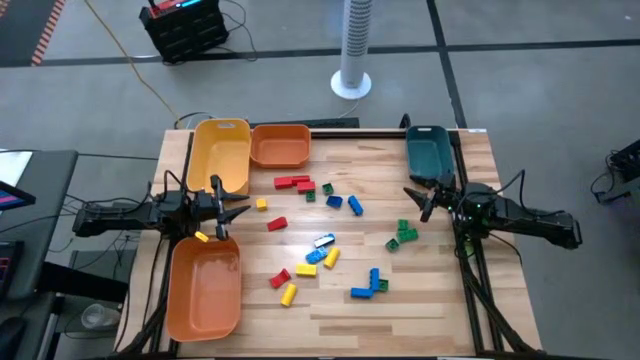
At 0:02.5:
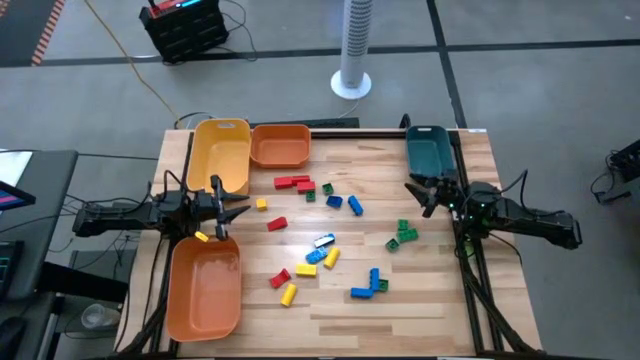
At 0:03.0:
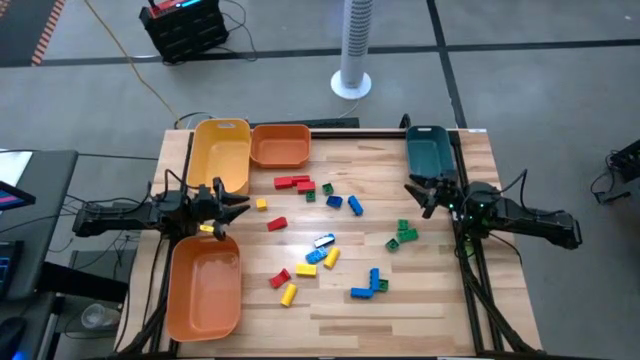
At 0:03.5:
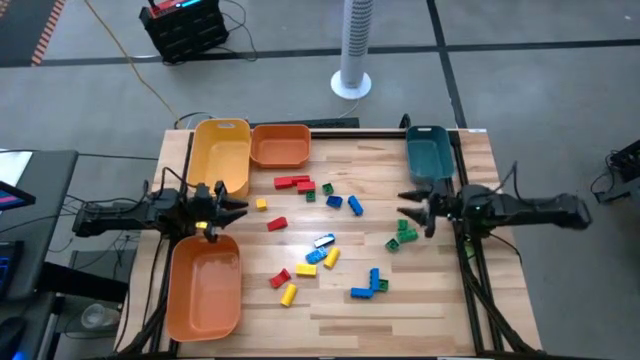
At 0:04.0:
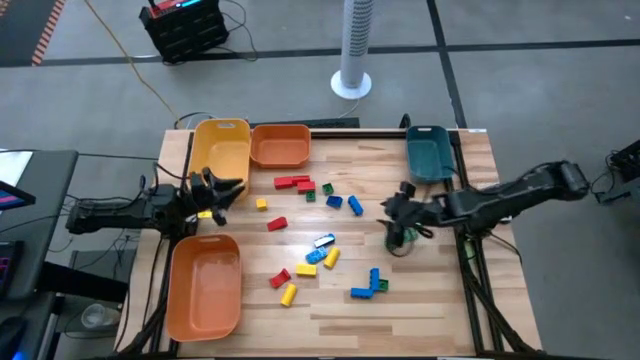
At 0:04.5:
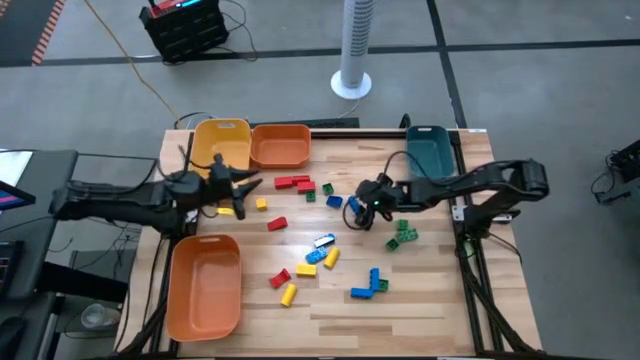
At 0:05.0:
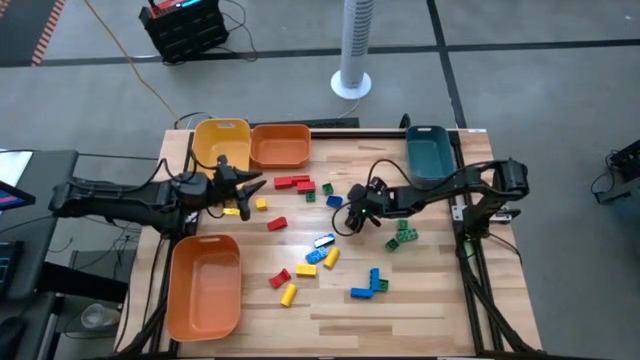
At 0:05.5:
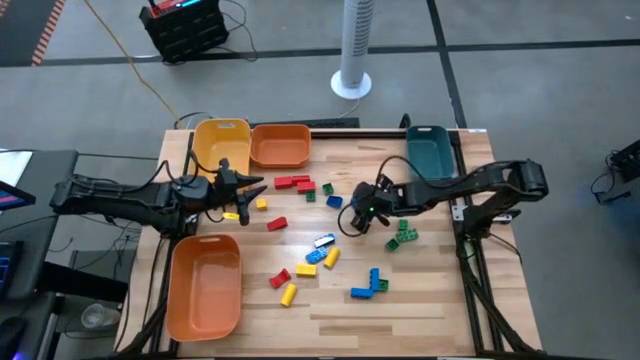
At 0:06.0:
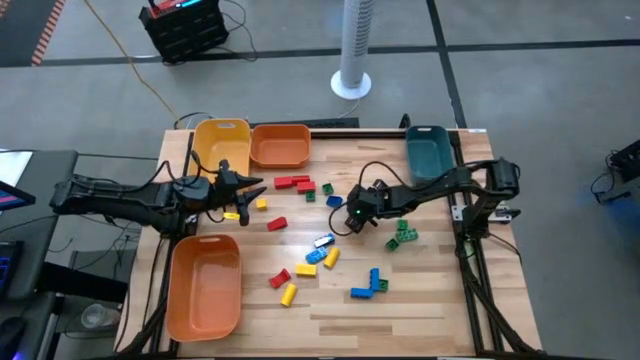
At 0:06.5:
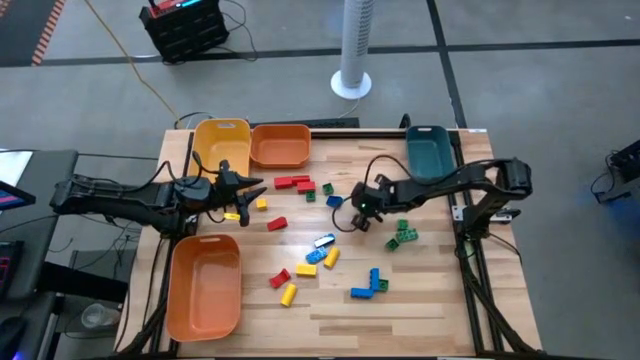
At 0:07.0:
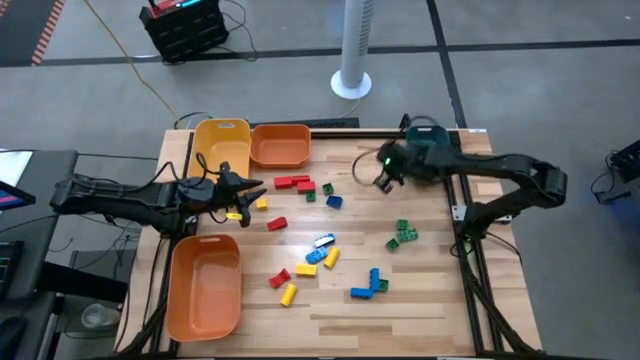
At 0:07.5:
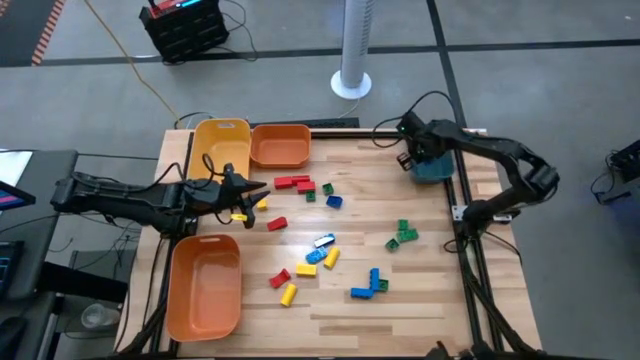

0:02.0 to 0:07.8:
Task: Sort blocks
Put the blue game piece into the blue bin

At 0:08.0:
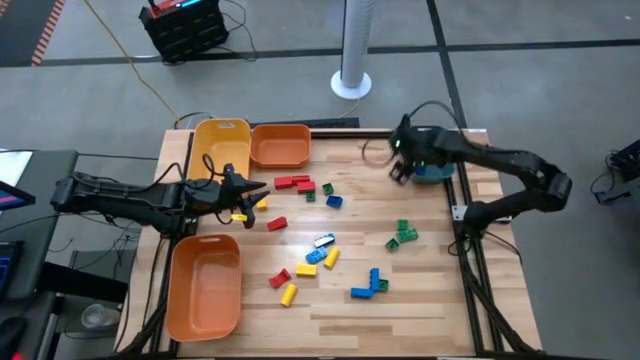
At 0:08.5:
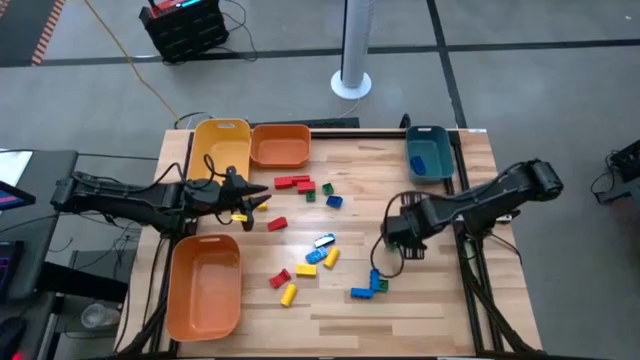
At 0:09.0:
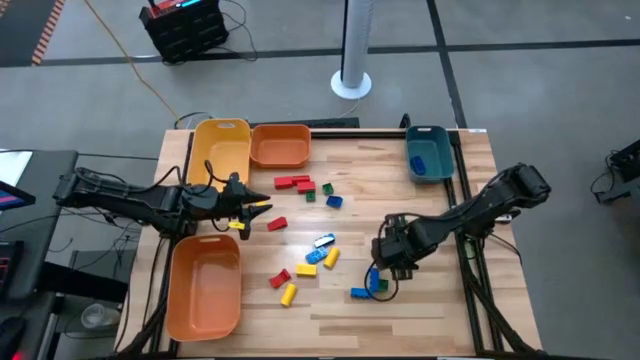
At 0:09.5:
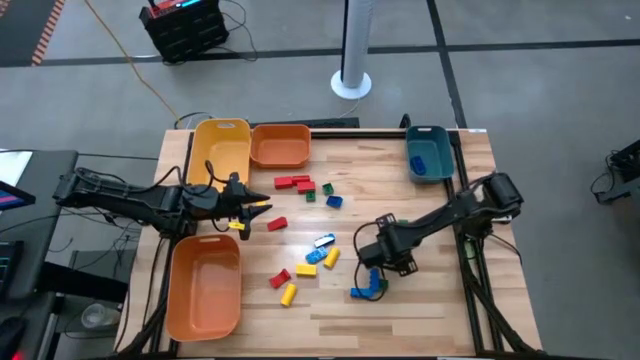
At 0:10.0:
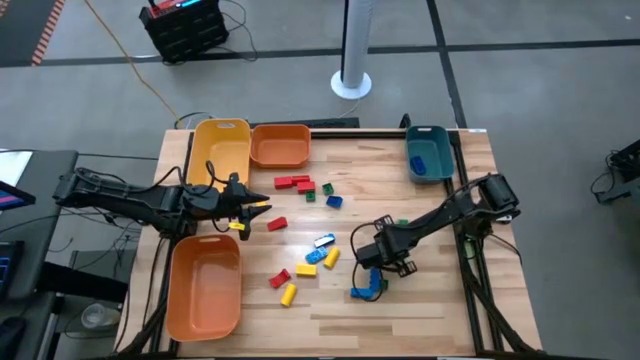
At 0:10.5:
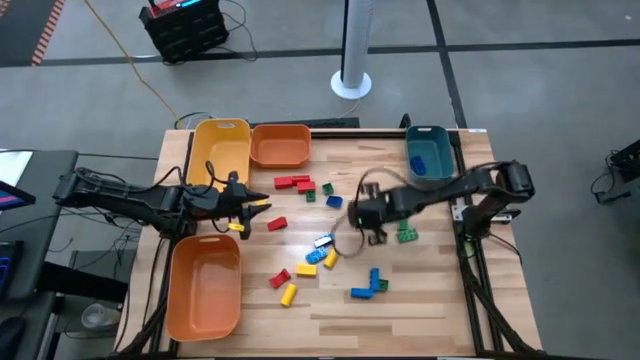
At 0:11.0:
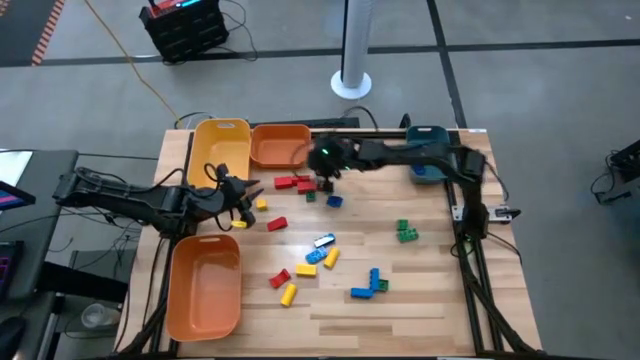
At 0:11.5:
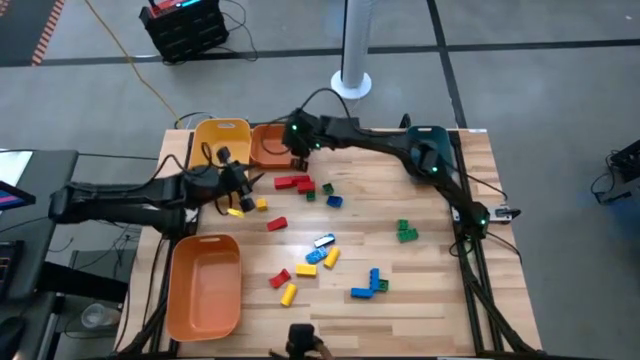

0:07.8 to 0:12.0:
Put the green game piece into the top orange bin

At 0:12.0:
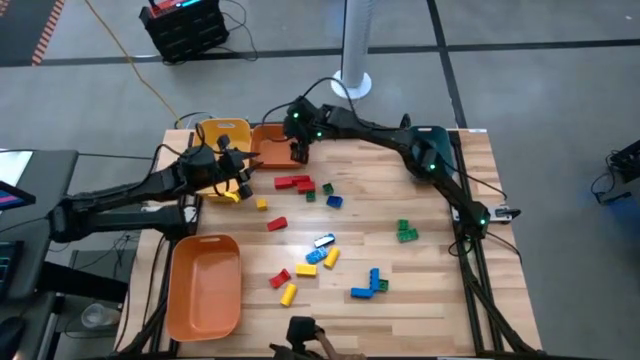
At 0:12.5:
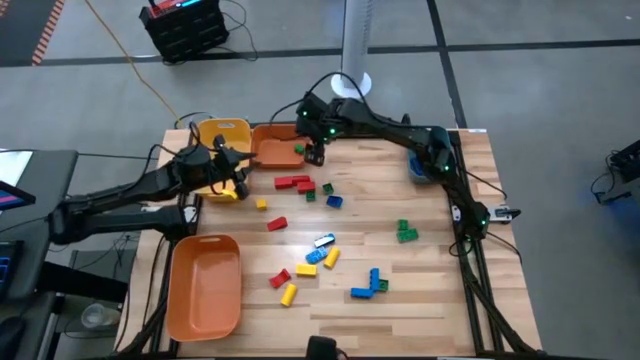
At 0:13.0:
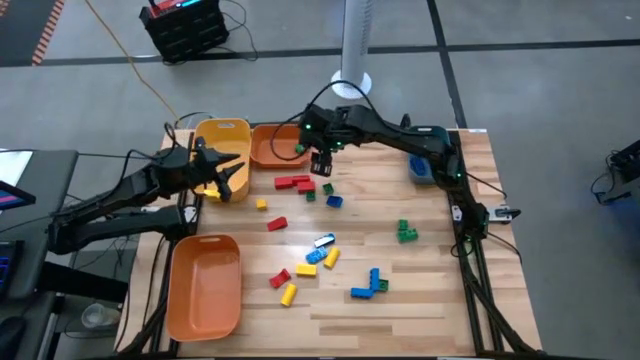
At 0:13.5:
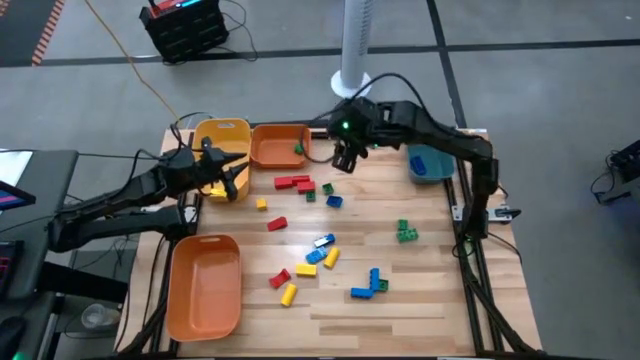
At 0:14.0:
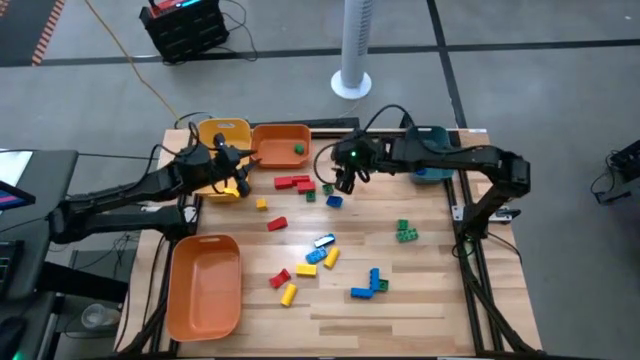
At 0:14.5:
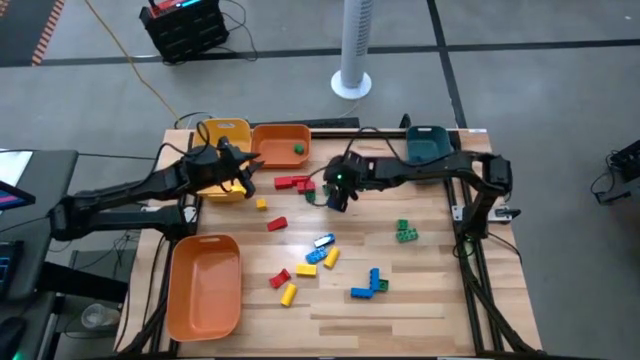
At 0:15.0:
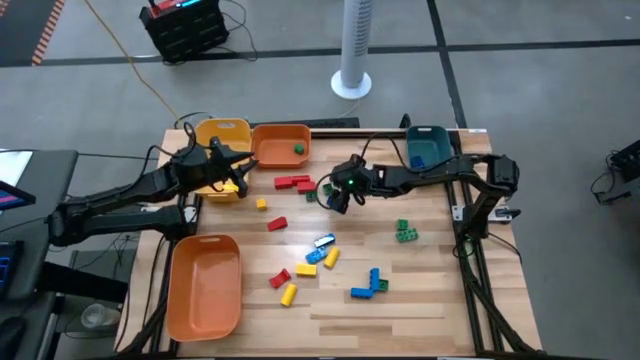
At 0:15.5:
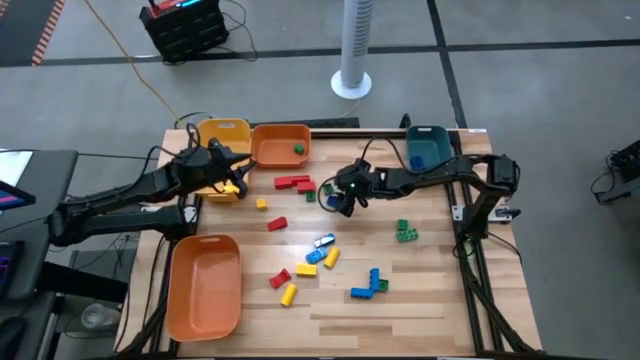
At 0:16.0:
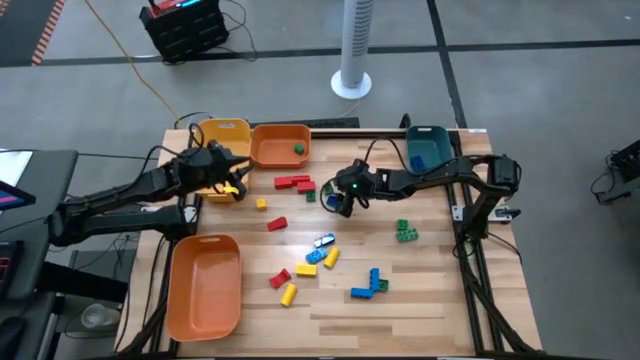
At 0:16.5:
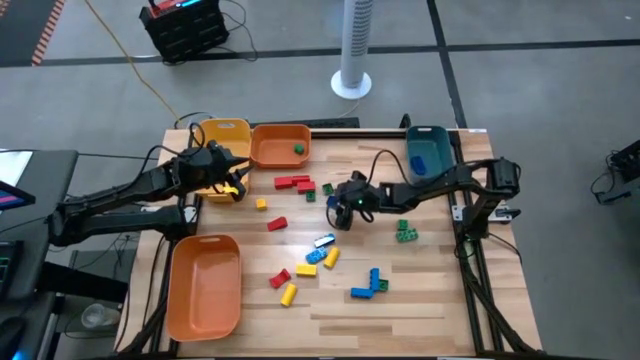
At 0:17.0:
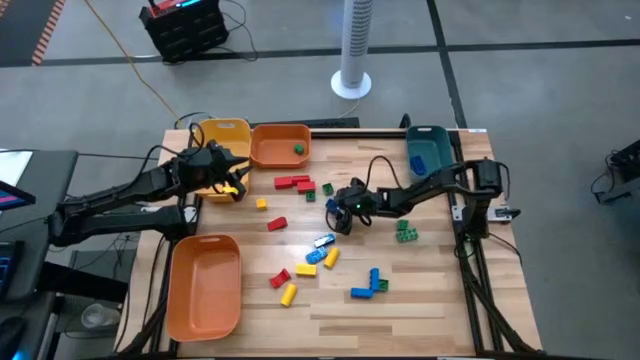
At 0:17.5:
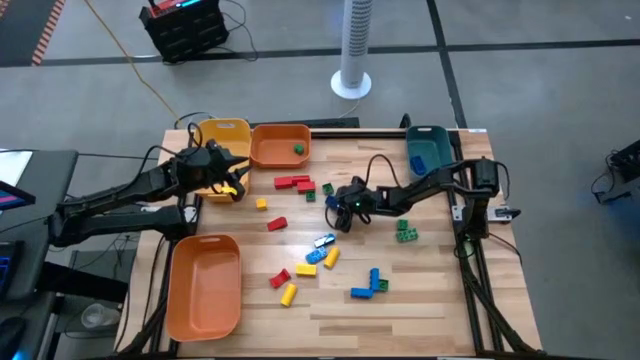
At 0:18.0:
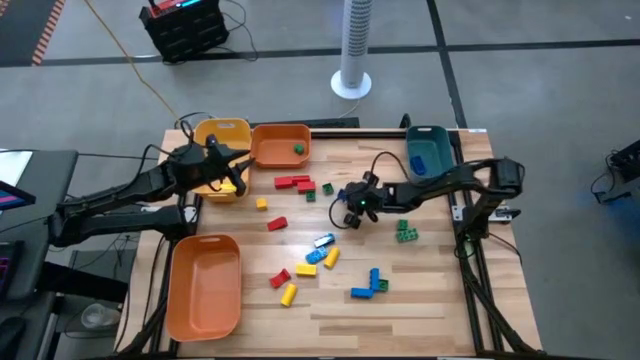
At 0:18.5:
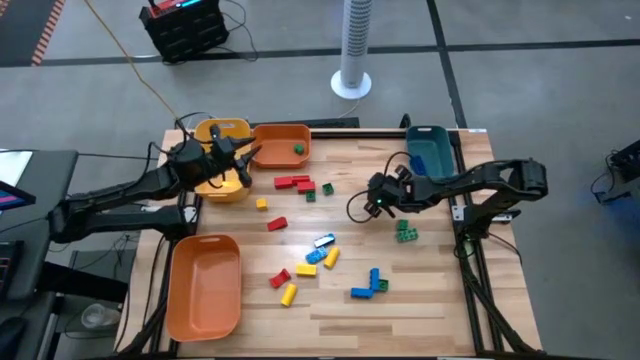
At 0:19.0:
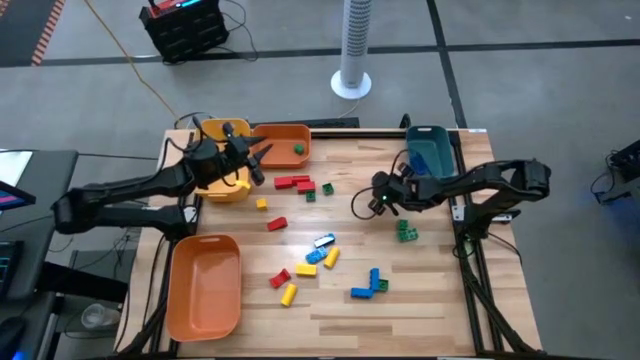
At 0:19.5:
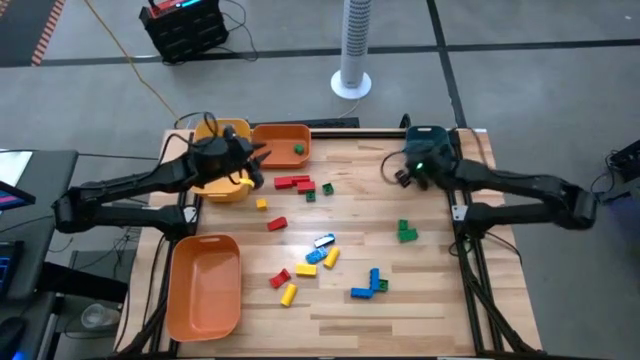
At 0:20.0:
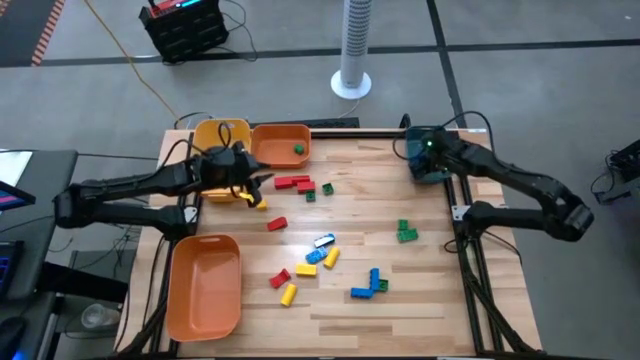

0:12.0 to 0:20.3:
Put the blue game piece into the blue bin

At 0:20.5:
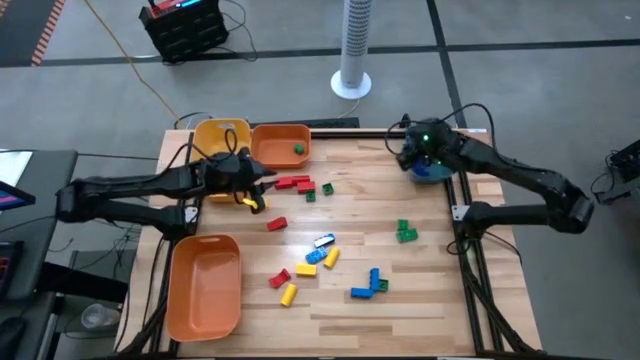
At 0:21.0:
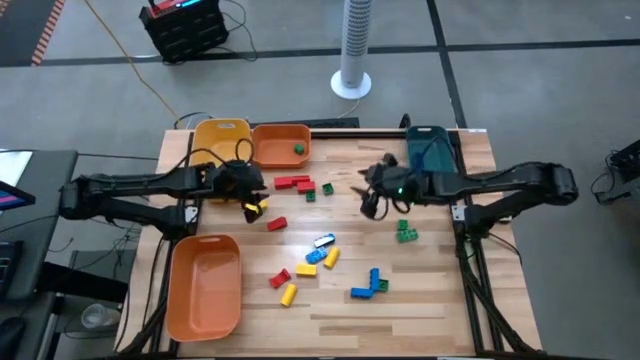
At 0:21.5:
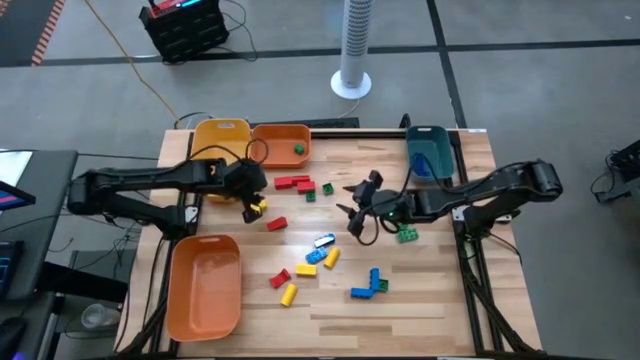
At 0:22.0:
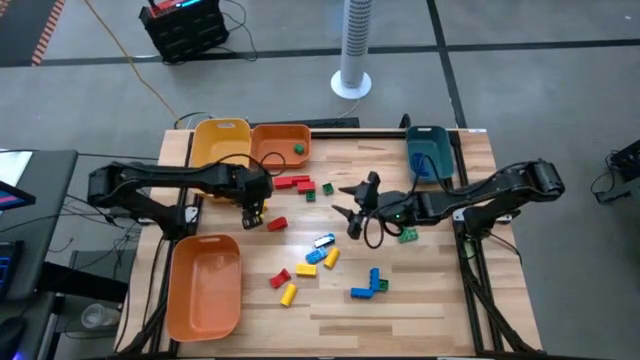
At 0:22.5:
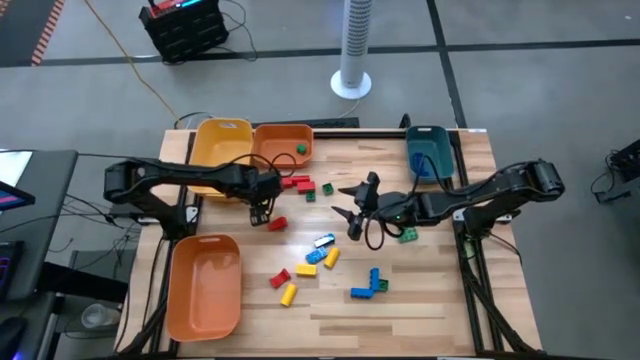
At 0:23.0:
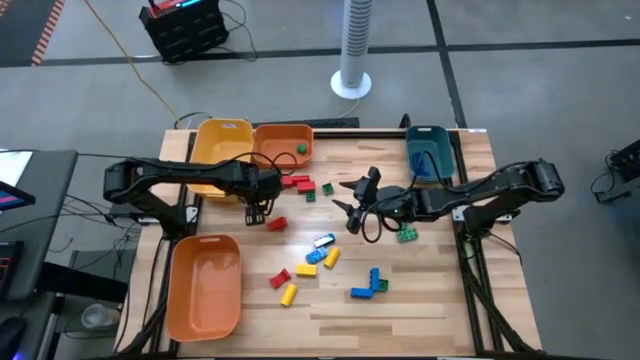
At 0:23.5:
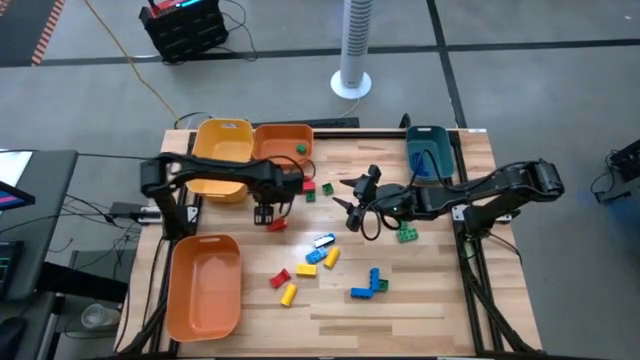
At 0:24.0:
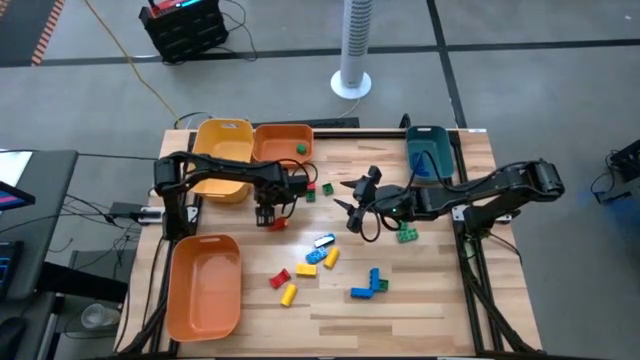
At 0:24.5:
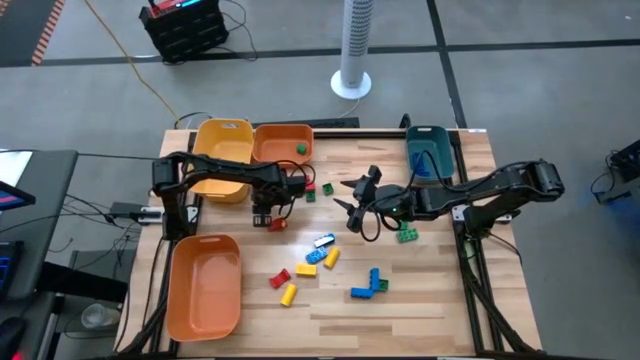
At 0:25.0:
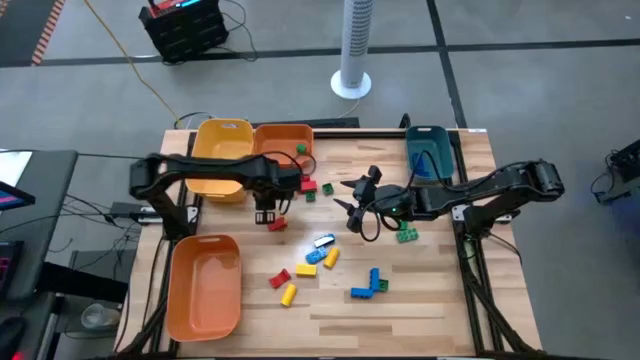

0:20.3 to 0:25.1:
Put the yellow wooden block into the yellow bin
